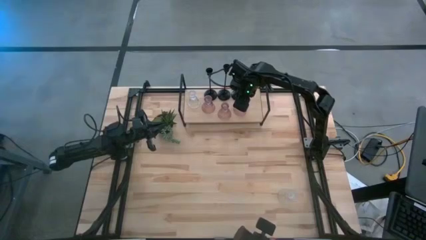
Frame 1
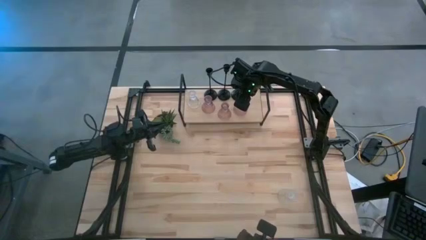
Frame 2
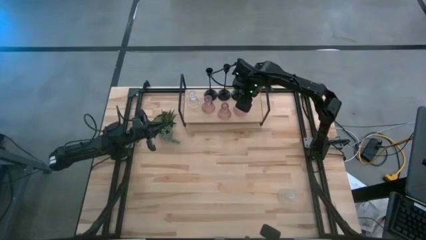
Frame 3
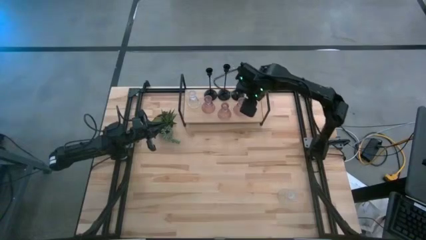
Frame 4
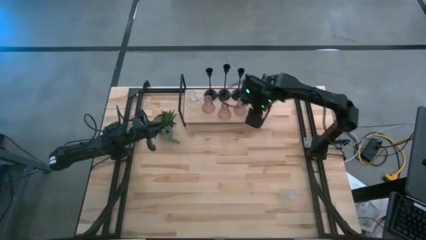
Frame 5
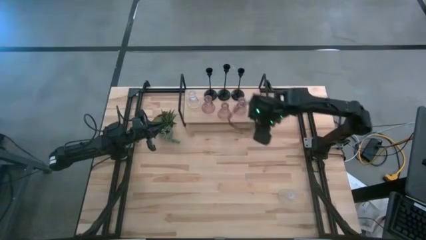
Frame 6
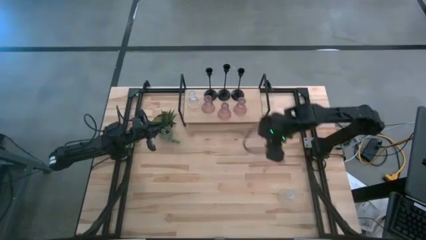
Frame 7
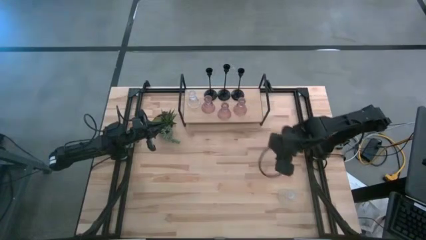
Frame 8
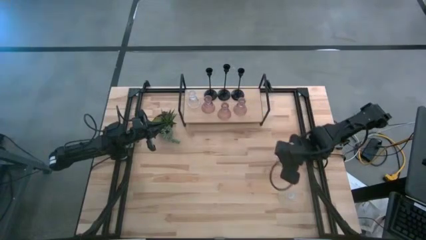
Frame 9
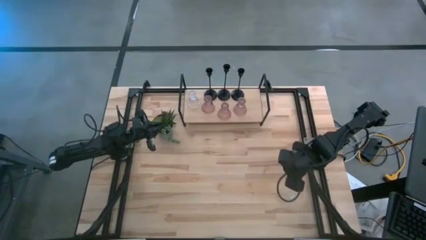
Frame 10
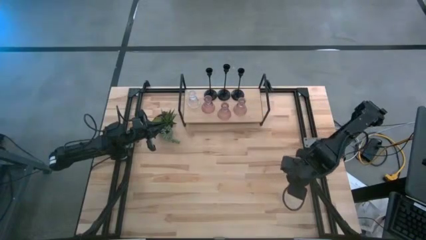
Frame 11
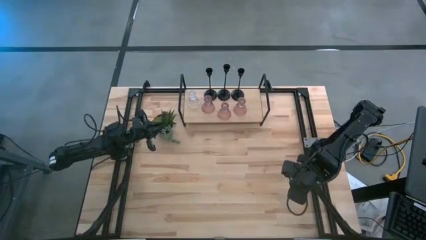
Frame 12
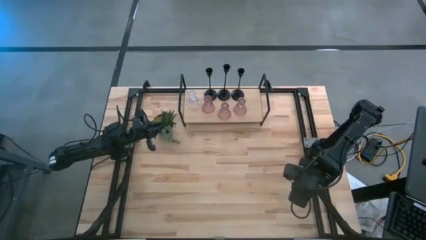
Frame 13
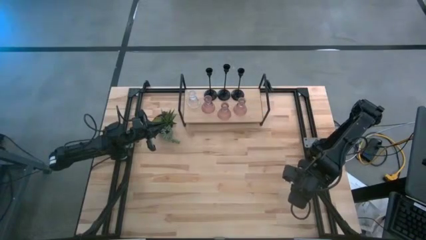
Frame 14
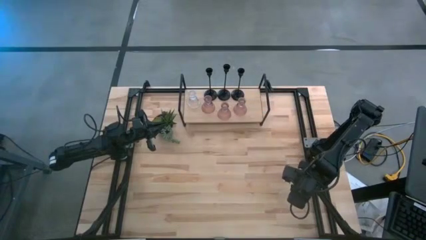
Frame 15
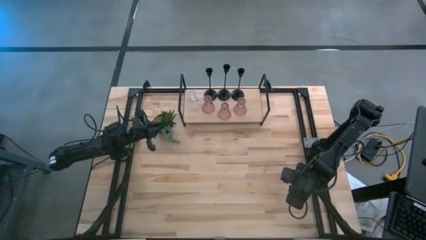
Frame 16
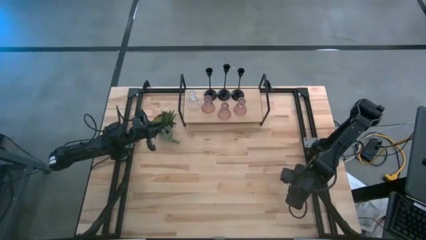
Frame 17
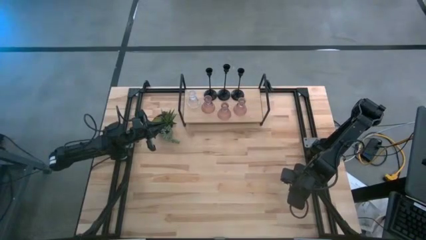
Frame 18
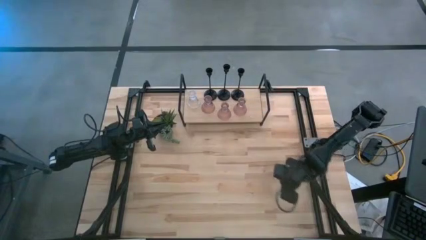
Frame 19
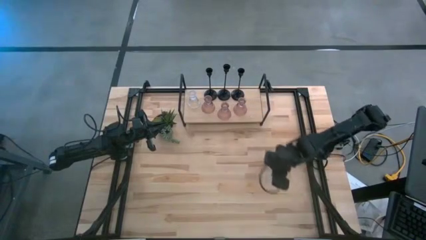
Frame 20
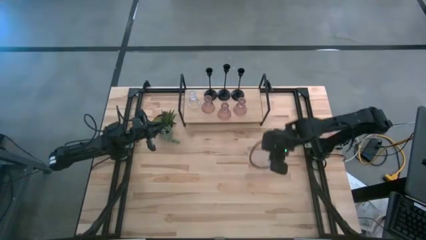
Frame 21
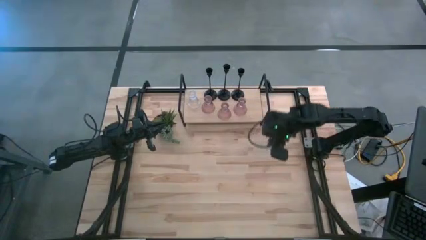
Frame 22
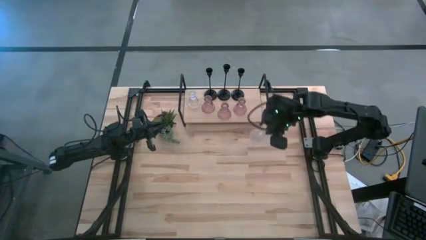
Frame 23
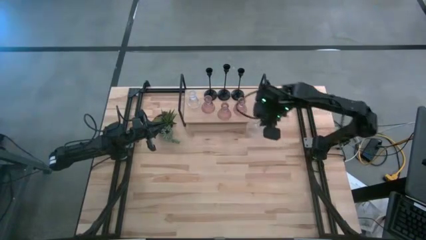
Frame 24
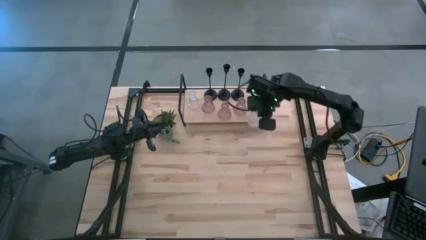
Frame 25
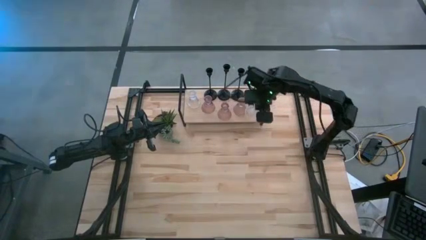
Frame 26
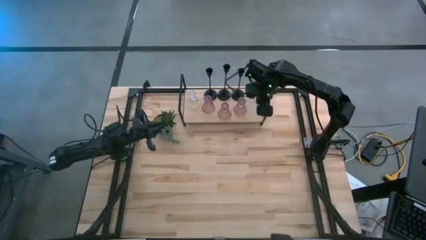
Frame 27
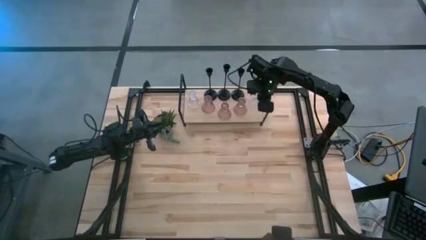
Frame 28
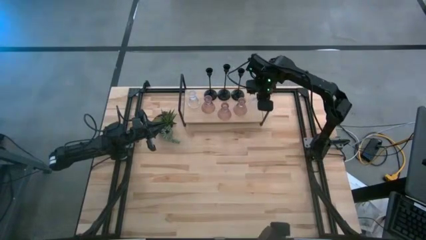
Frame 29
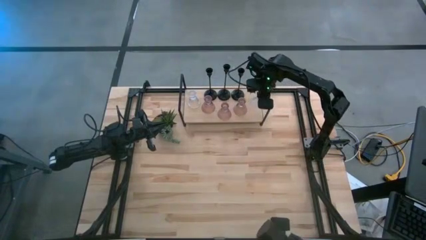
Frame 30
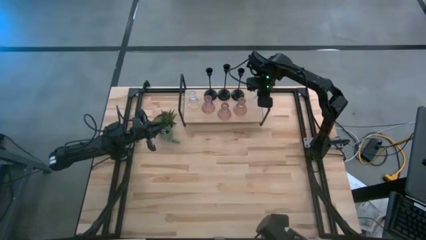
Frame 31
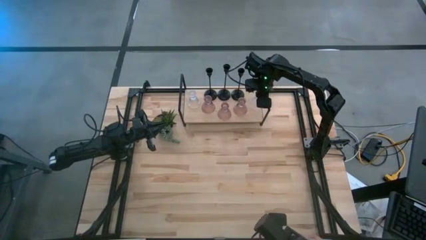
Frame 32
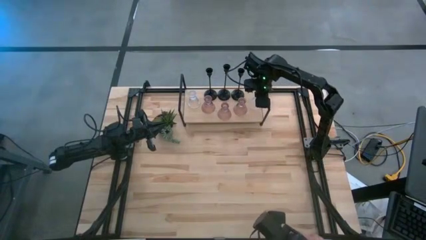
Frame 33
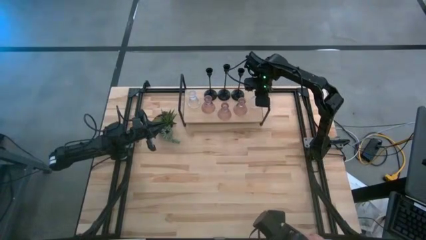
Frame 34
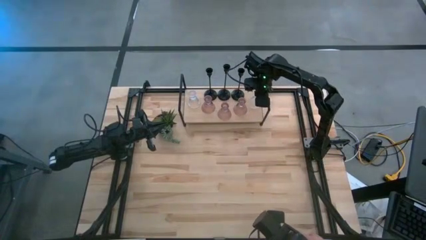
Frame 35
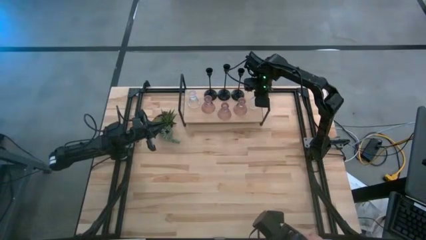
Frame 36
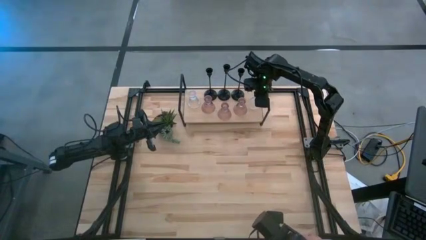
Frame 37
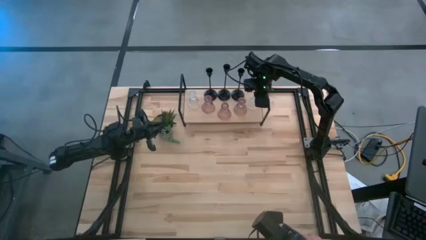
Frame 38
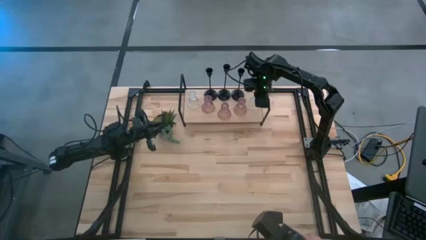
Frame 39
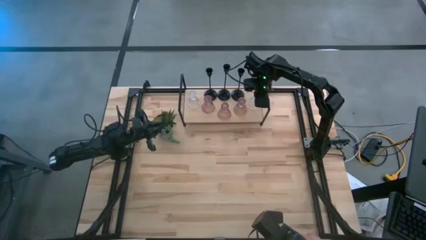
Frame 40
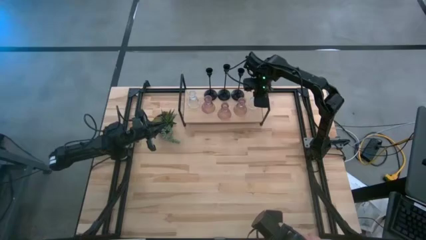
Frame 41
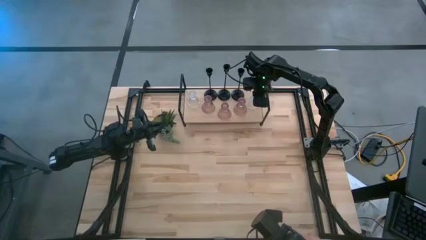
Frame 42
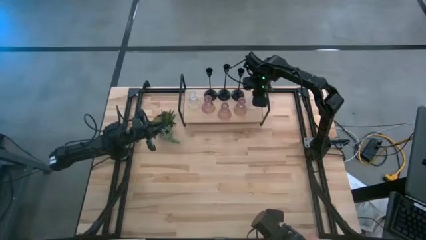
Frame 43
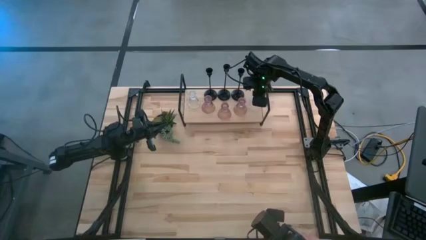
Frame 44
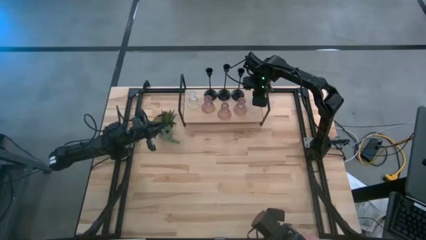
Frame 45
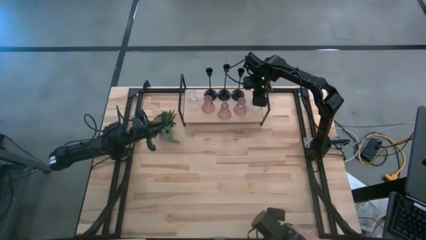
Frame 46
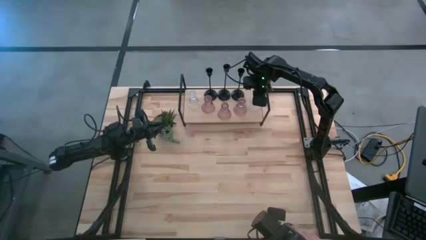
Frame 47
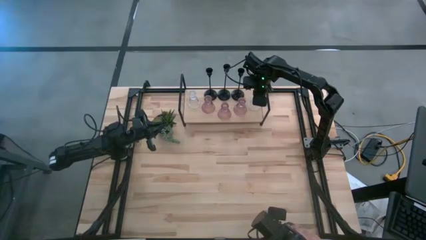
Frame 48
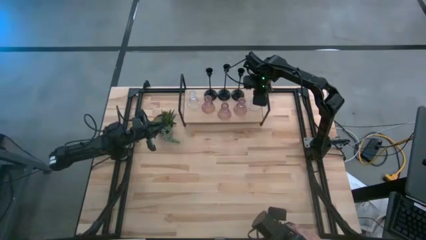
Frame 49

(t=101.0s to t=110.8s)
Task: Pick & Place candle stick holders
Put the transparent candle holder on the shelf

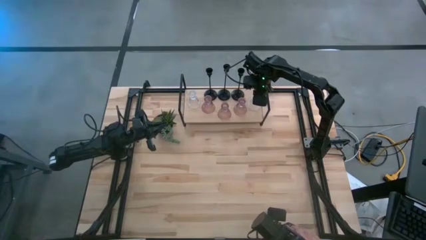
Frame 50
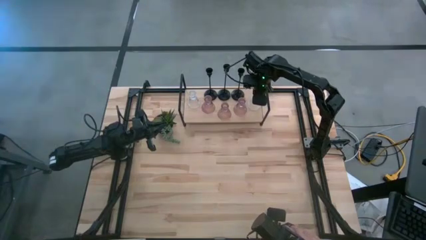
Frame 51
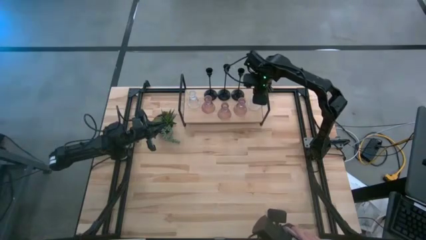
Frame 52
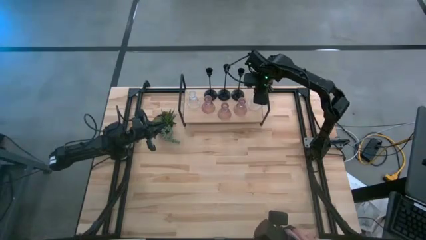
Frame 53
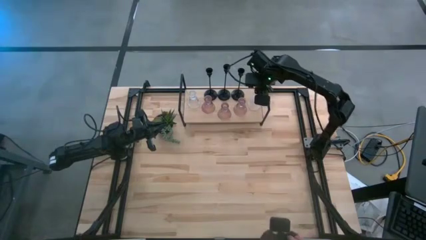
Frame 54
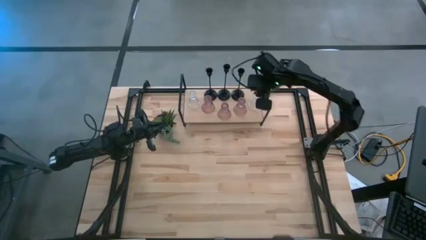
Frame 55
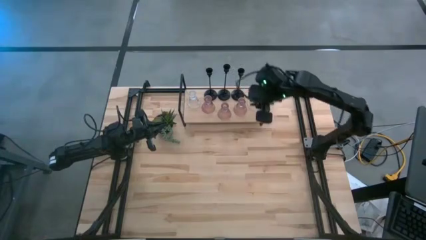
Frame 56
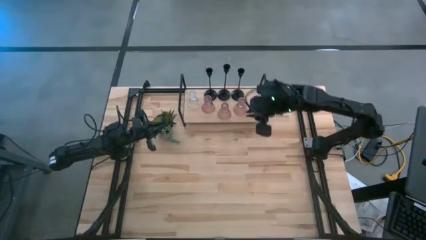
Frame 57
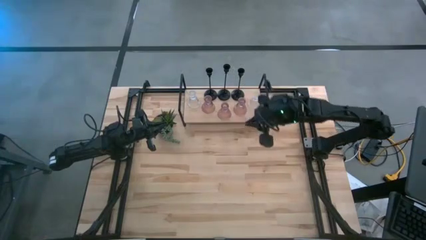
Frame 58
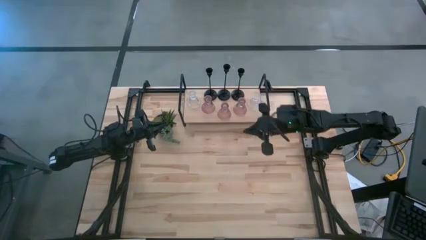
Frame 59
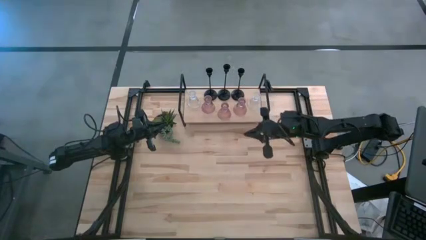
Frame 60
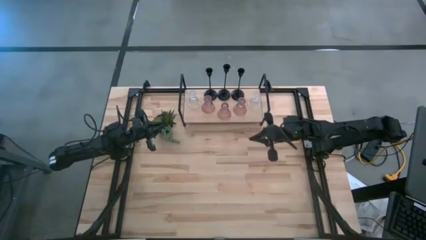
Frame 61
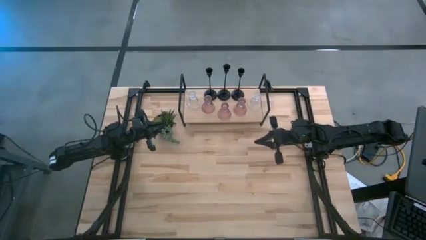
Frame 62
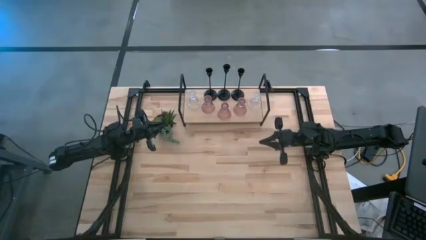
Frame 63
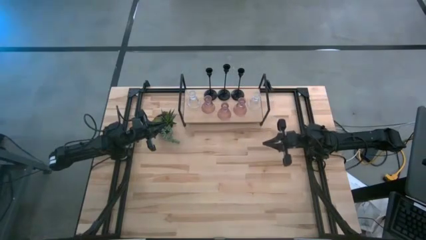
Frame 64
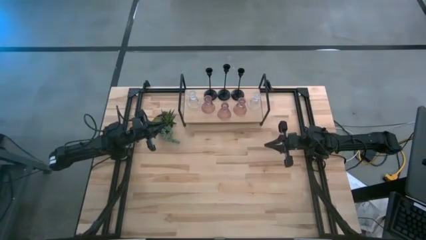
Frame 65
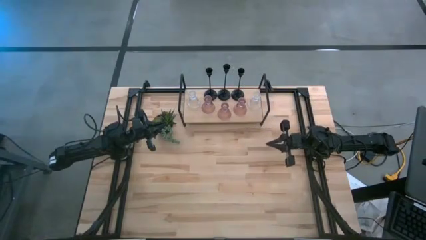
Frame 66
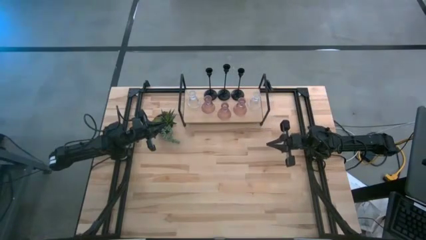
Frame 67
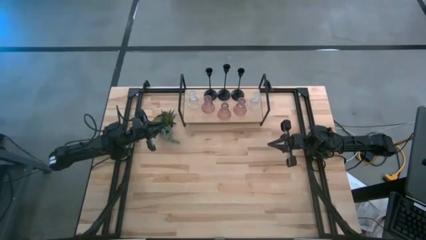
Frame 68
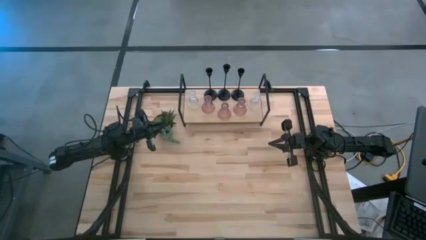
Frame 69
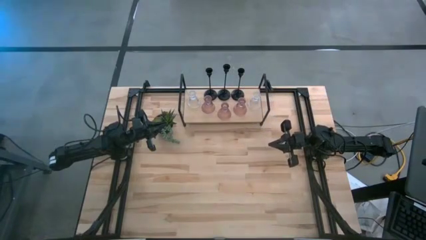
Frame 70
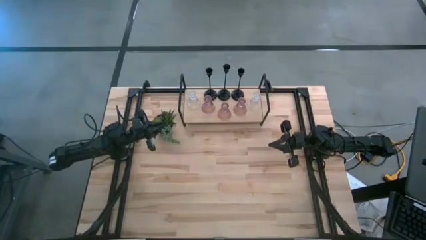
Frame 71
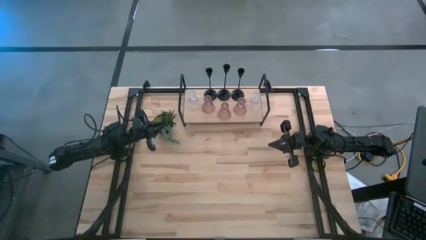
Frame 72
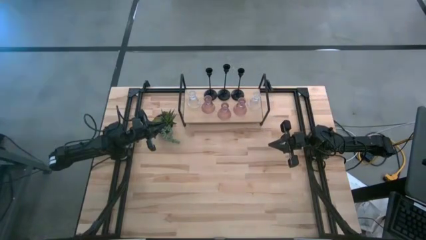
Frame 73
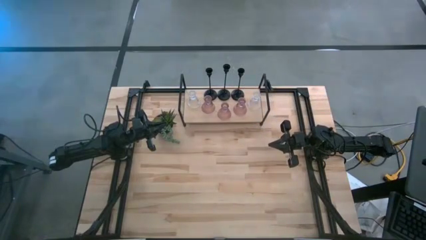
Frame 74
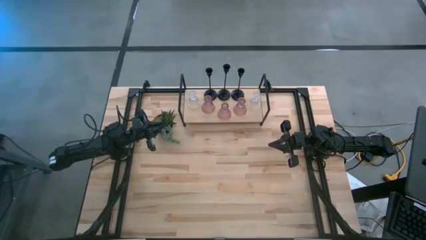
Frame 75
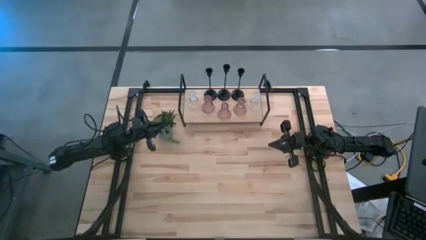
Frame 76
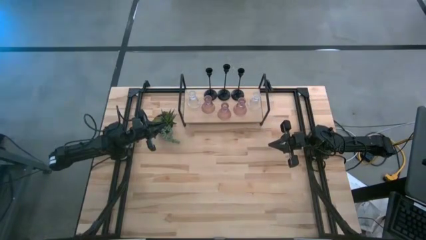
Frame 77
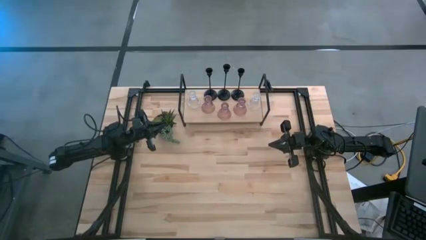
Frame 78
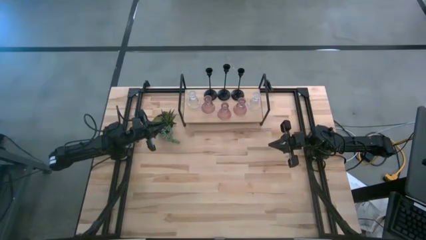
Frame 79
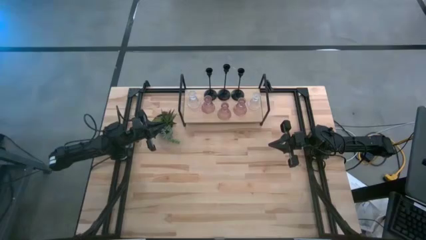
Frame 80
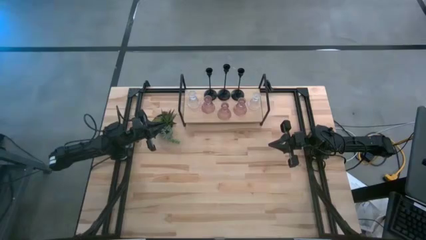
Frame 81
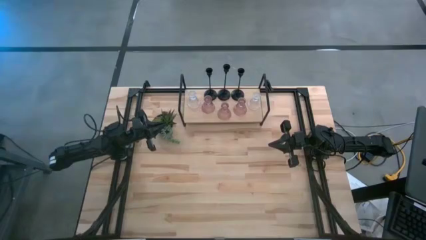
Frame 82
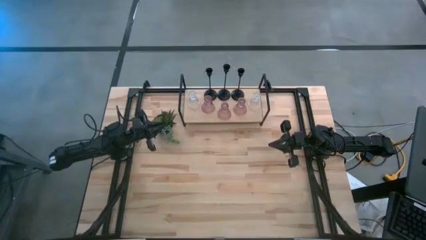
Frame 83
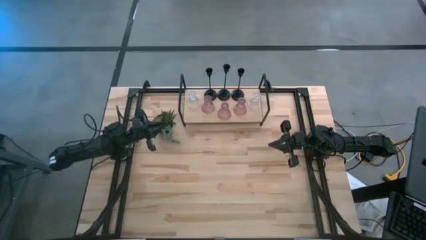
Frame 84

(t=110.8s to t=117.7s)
Return to Home Position

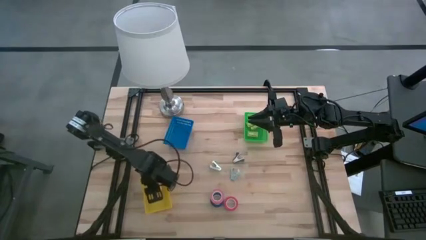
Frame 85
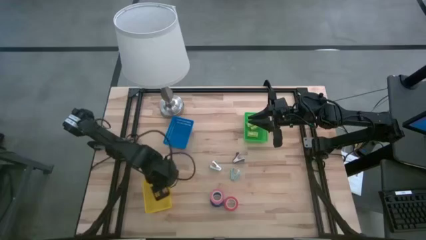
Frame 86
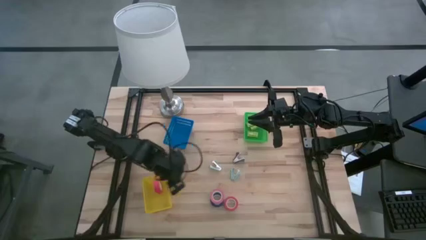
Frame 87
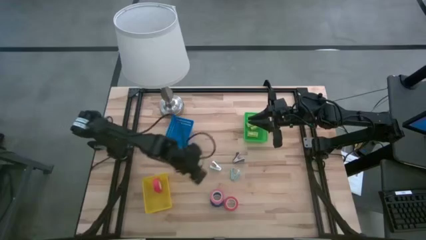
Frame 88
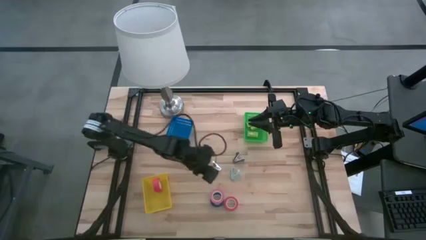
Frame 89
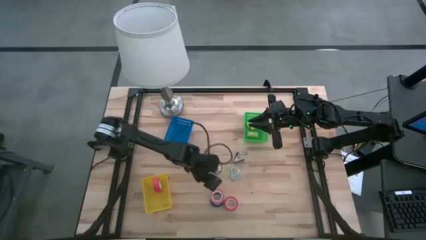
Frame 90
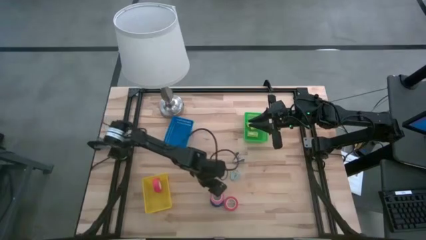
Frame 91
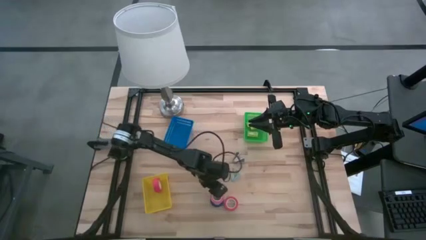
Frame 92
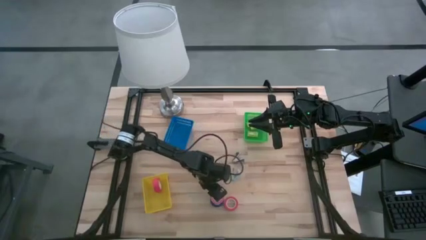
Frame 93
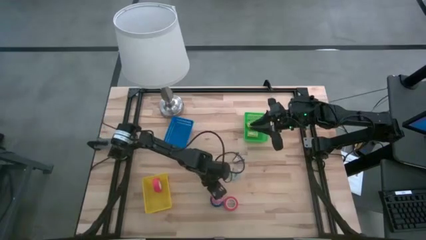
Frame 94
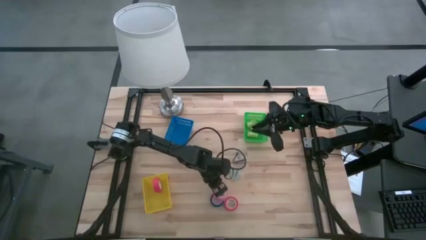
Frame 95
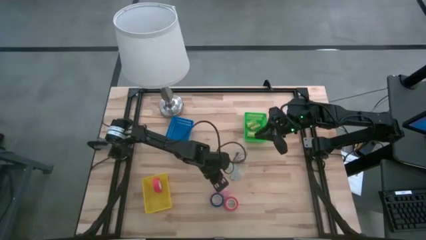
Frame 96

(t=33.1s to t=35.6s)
Task: Pick and place Stapler, Stapler remover, tape
Put the pink tape into the yellow bin
